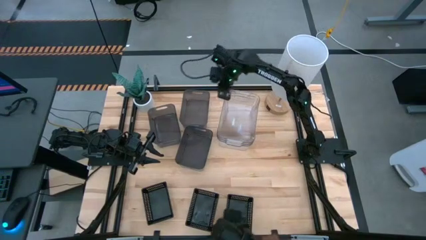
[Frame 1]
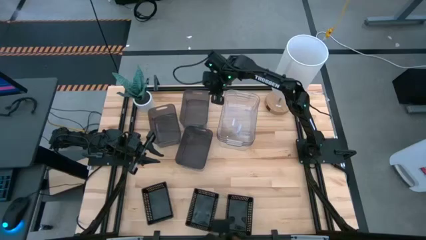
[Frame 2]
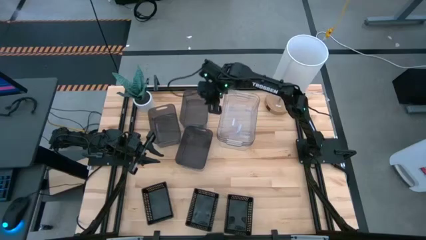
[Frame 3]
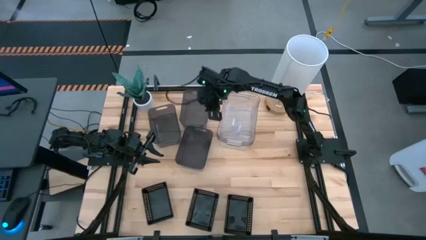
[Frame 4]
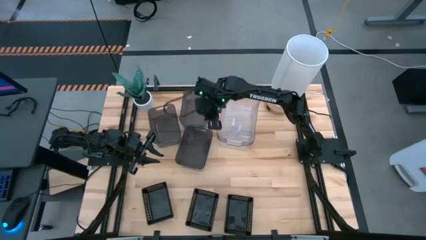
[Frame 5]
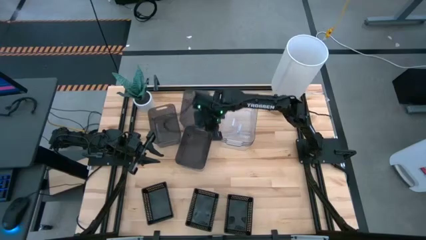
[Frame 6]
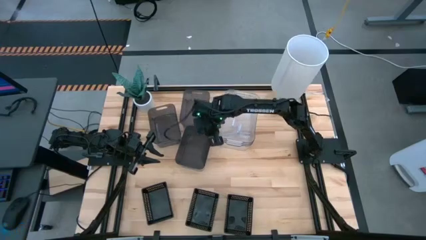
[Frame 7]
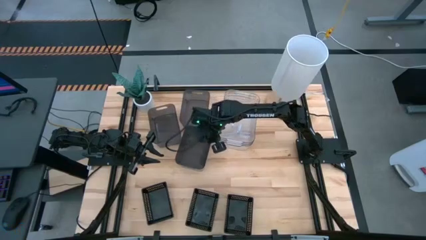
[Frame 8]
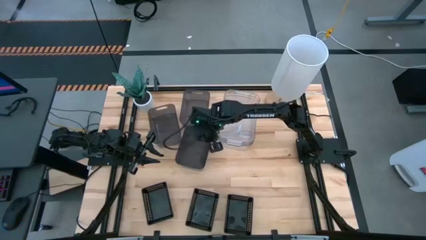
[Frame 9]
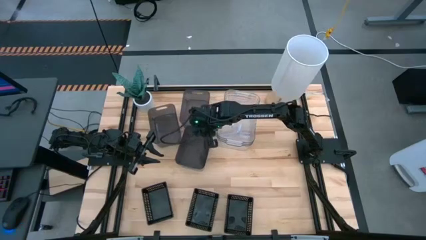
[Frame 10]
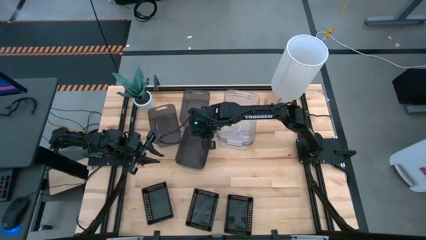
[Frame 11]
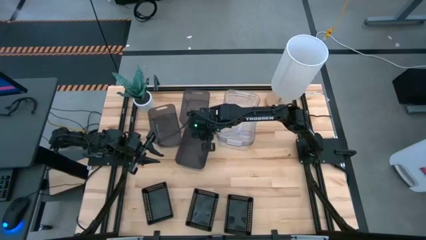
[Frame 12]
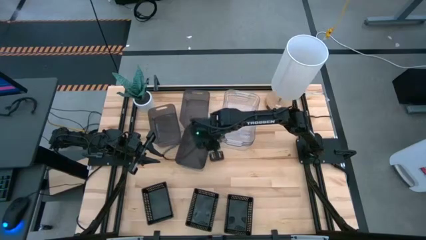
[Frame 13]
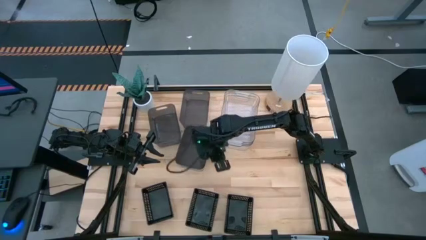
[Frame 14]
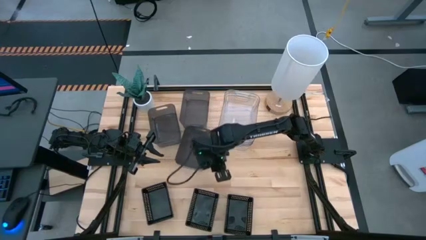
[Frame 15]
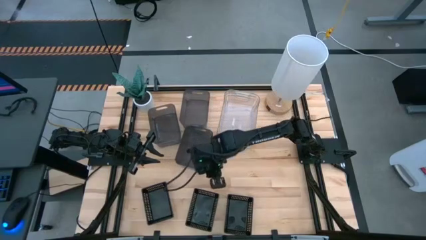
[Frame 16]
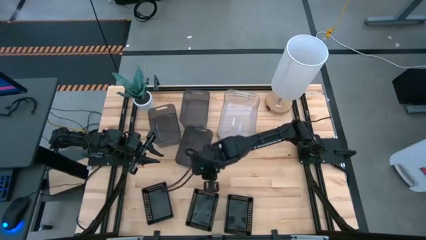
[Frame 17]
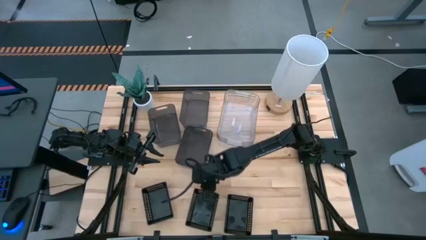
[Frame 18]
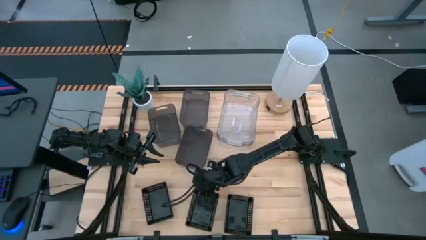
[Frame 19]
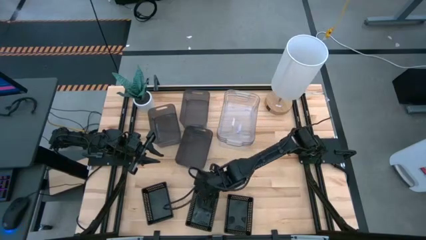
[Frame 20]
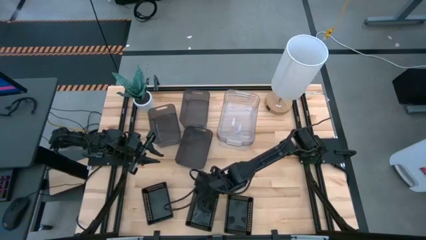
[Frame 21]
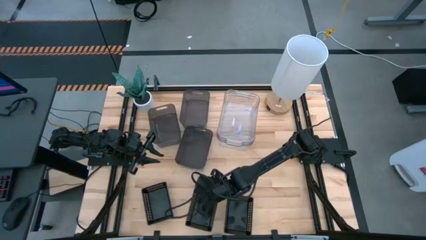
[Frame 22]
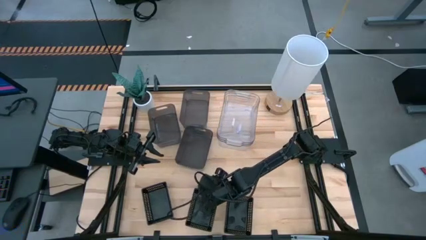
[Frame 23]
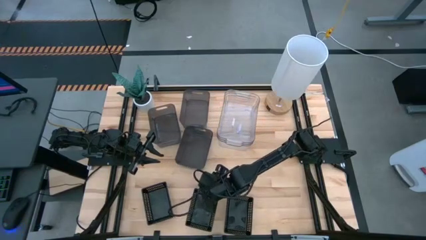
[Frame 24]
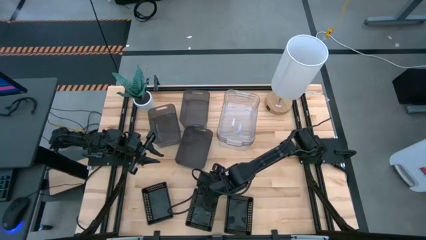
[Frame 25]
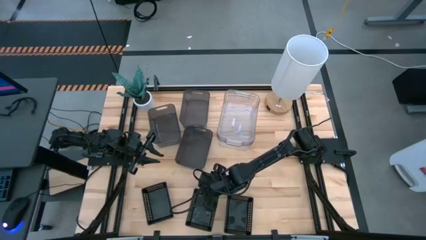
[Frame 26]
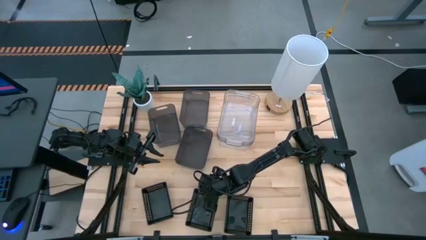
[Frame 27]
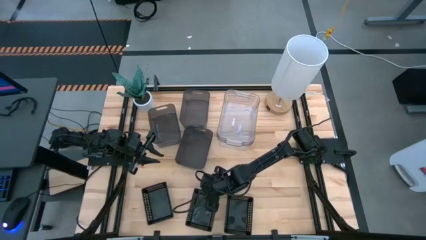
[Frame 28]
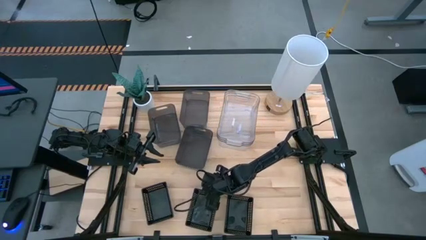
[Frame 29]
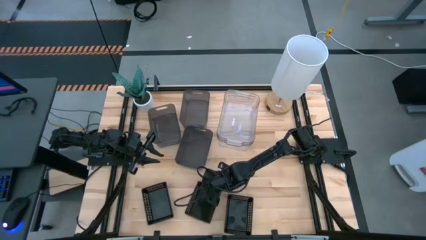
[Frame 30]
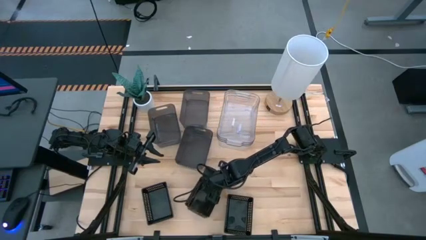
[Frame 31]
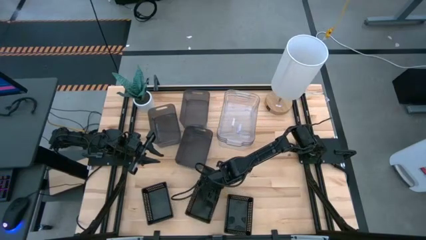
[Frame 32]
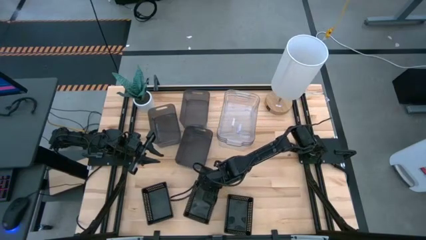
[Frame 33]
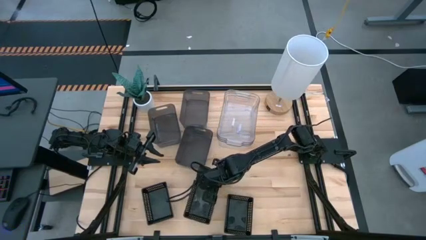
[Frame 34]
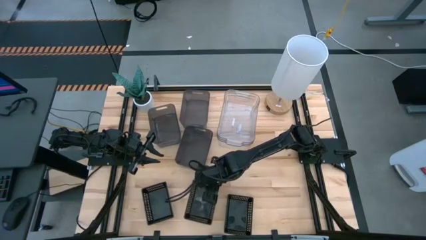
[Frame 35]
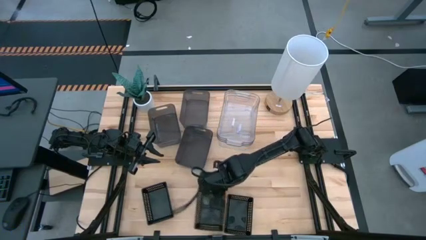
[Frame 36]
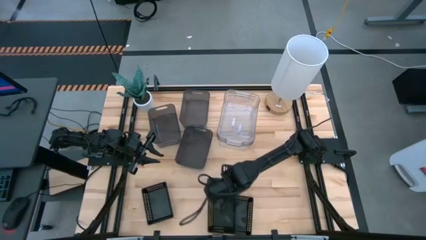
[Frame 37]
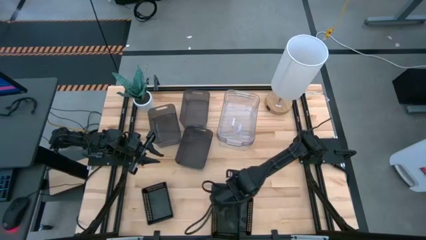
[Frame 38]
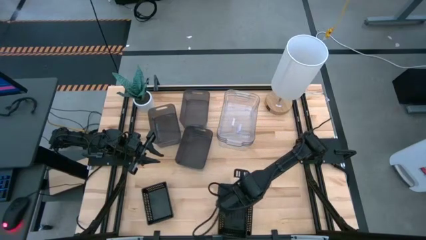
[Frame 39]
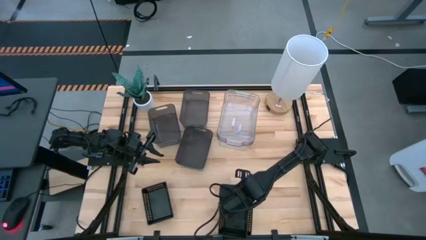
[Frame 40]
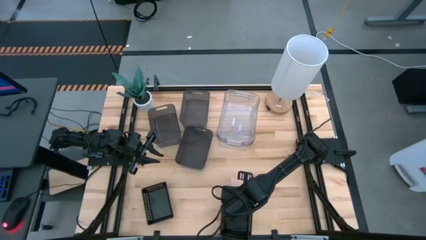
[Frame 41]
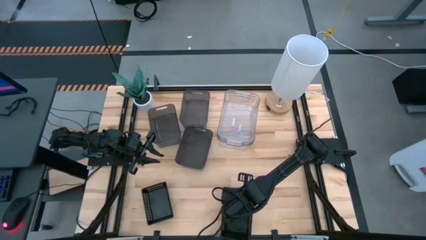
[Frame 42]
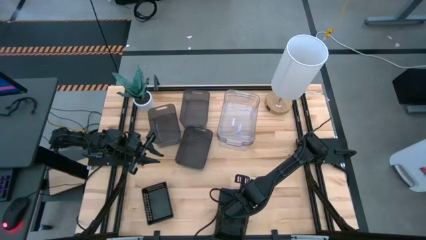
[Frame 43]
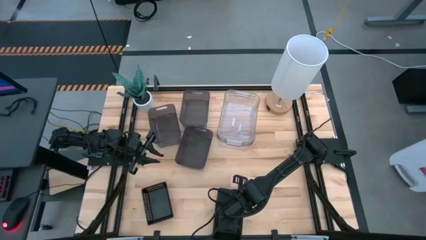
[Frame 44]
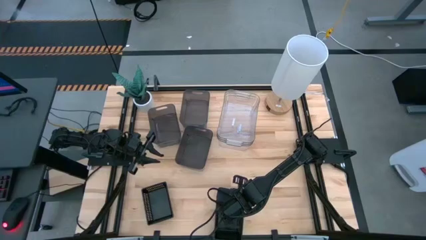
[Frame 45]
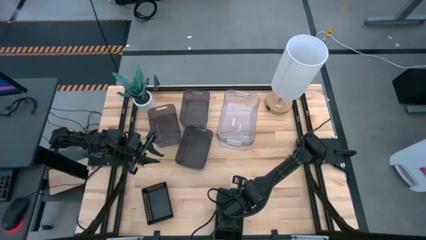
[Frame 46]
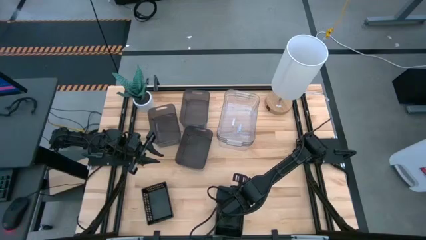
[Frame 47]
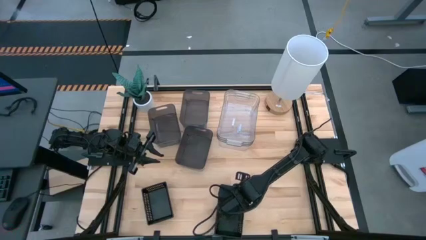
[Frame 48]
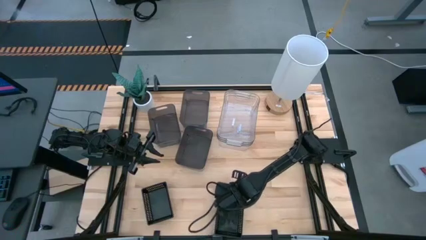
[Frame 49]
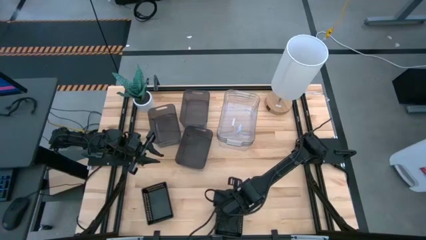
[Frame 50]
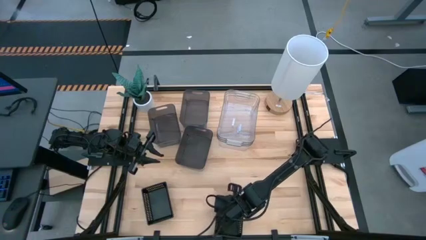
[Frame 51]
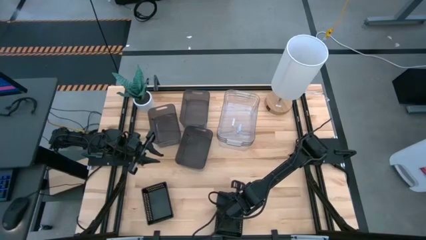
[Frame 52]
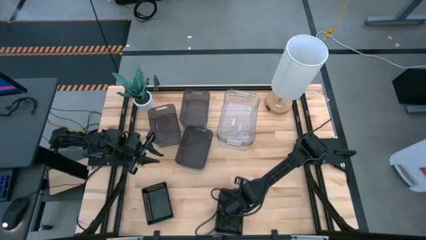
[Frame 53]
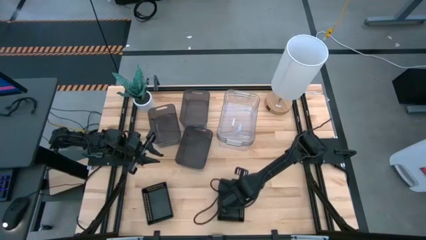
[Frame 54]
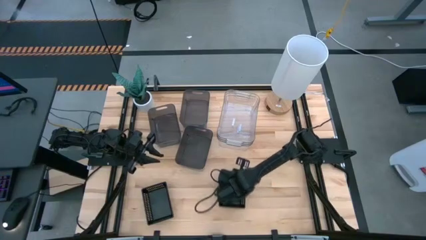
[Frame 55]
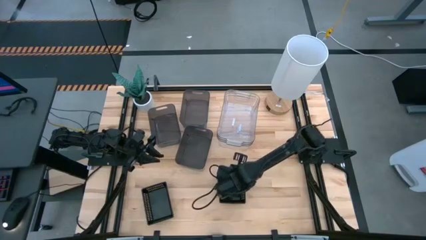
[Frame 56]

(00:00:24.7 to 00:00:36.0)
Stack the middle black bin on the right black bin

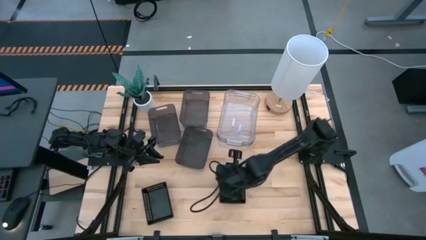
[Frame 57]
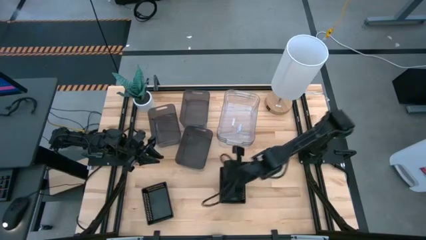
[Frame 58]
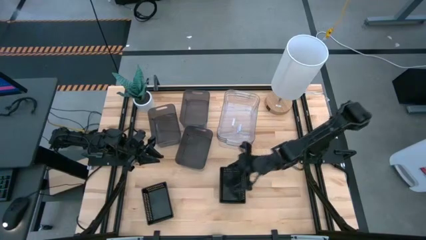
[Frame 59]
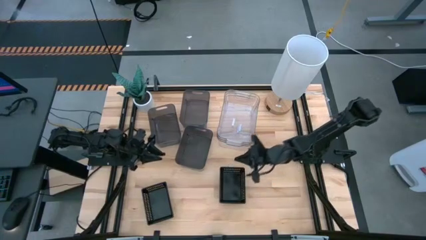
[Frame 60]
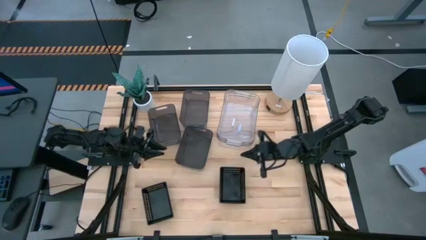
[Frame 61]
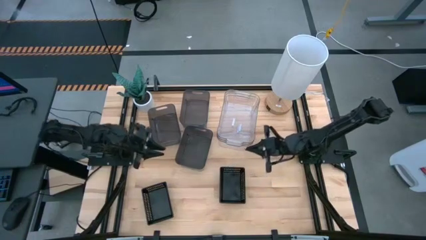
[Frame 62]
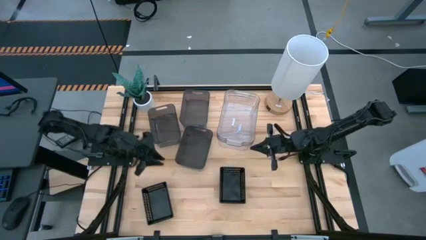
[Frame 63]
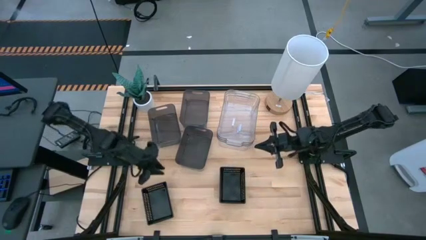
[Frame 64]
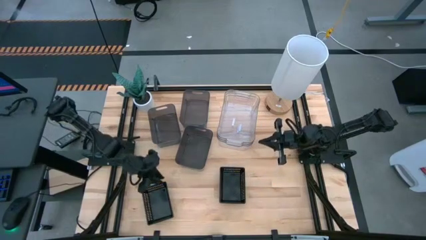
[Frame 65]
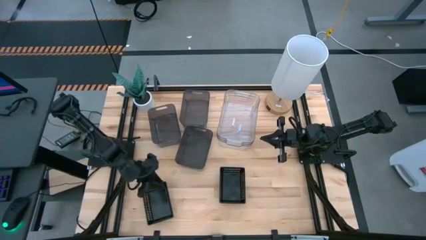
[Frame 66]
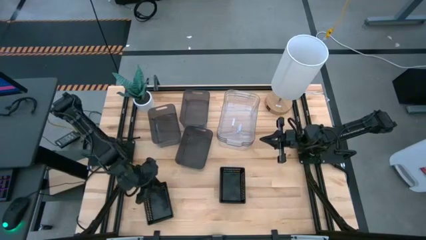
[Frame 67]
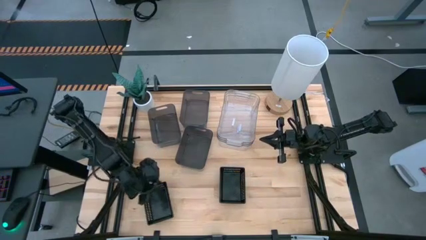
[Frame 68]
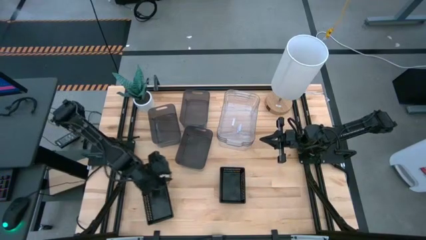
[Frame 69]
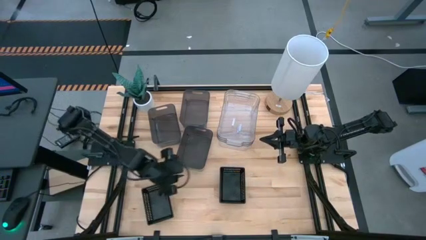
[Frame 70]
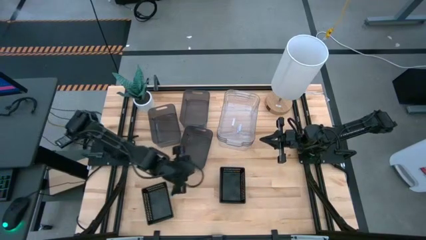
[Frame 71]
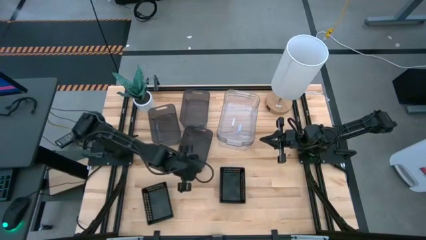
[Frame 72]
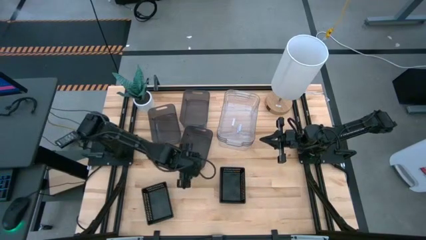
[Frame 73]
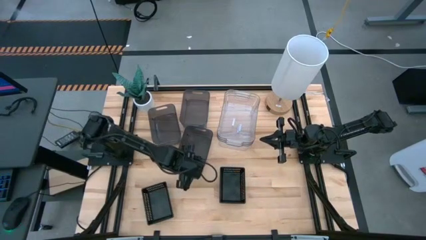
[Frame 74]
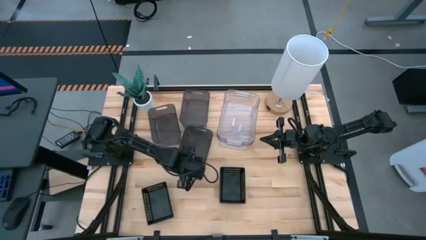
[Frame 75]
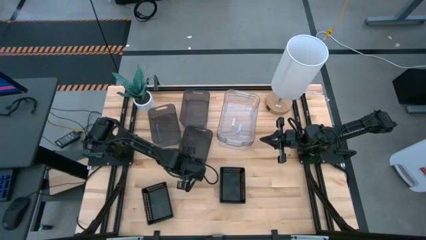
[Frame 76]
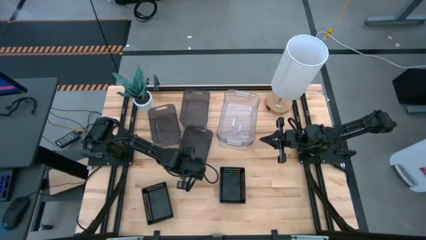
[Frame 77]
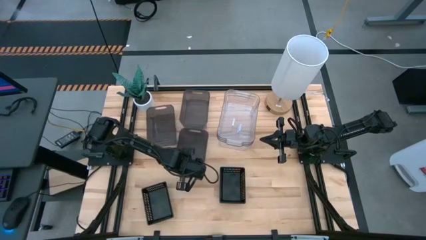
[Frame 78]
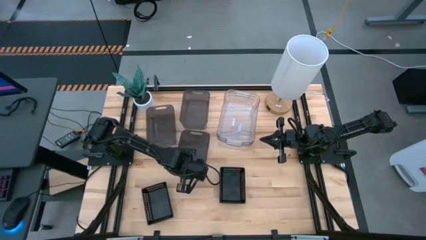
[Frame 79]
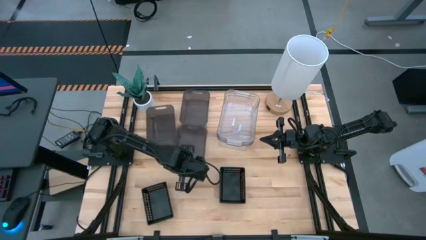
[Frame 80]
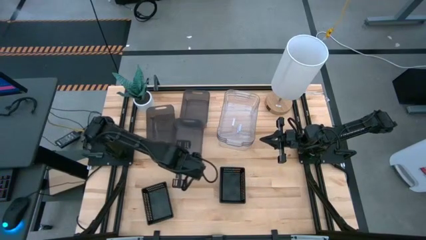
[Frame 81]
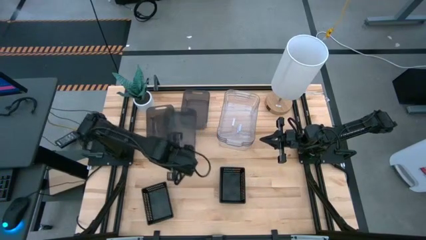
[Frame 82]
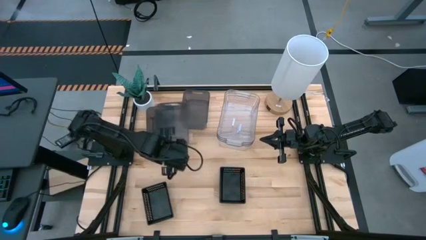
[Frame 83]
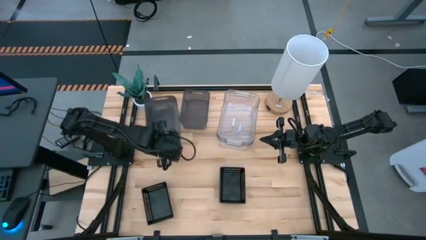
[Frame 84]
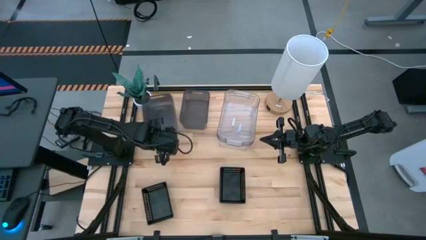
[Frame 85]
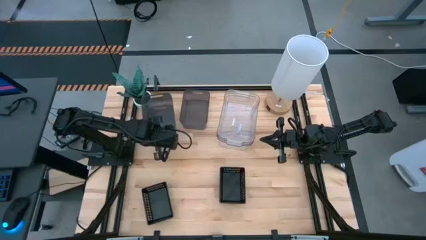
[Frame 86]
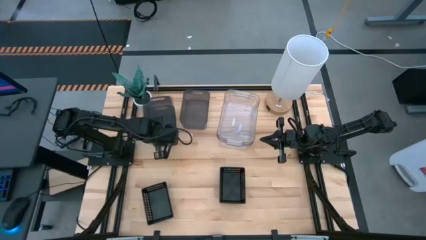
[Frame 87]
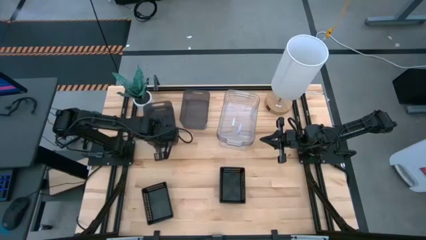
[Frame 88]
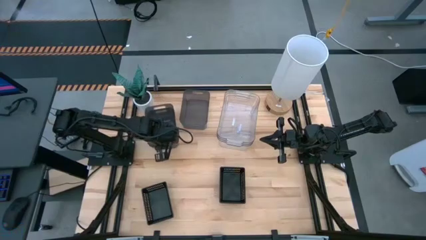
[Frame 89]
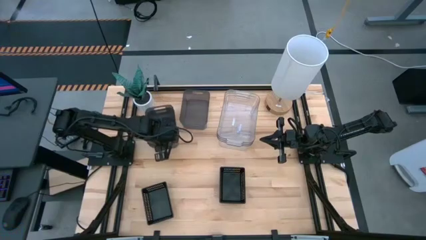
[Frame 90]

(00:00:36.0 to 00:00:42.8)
Stack the bottom black bin on the top left black bin
